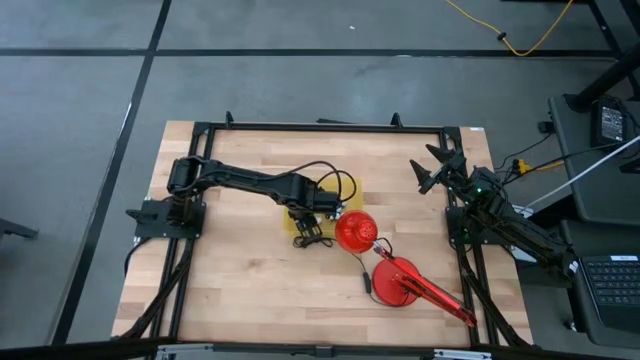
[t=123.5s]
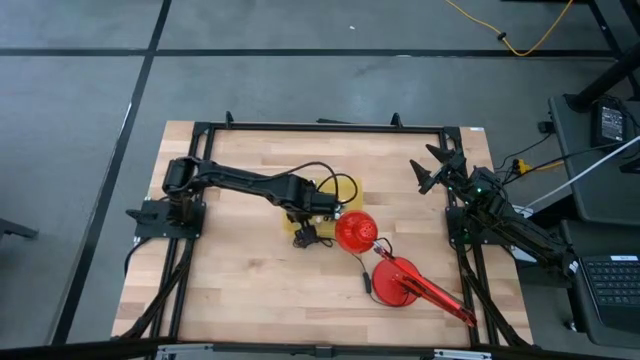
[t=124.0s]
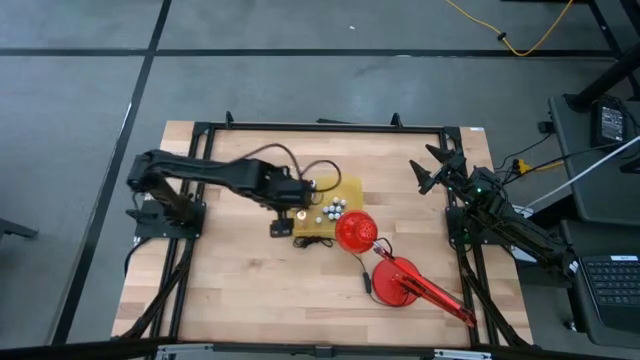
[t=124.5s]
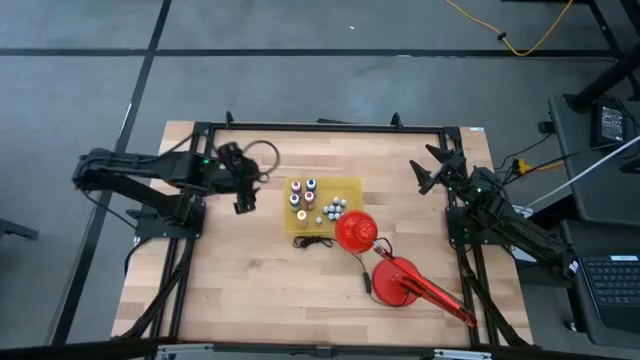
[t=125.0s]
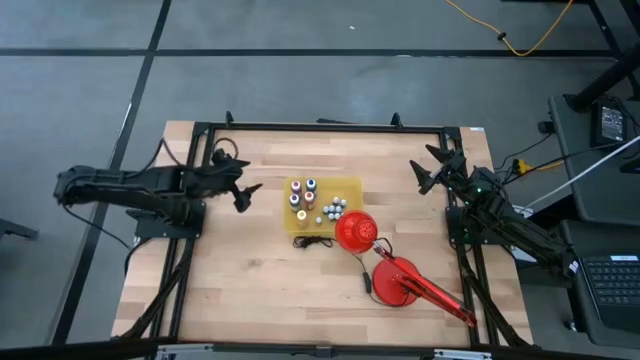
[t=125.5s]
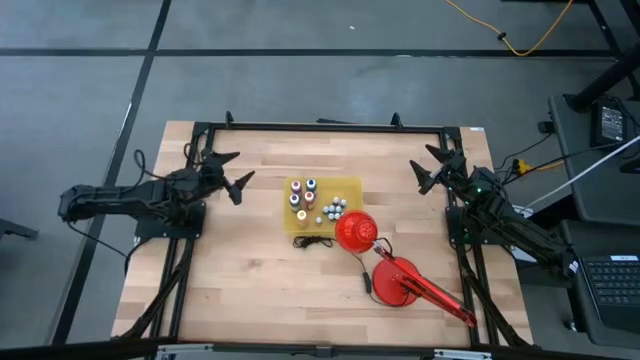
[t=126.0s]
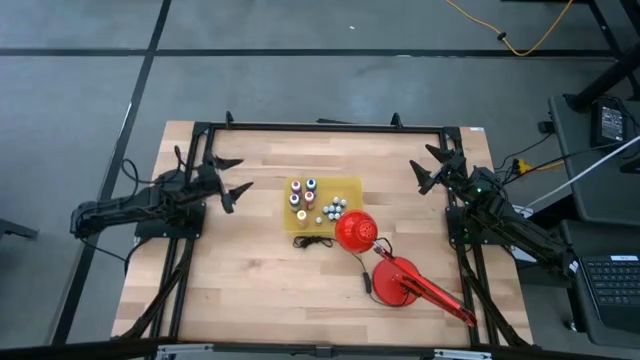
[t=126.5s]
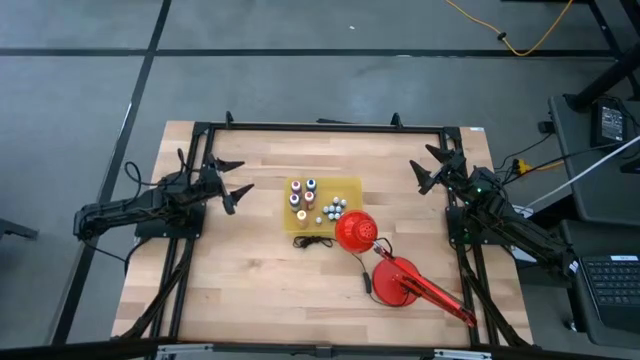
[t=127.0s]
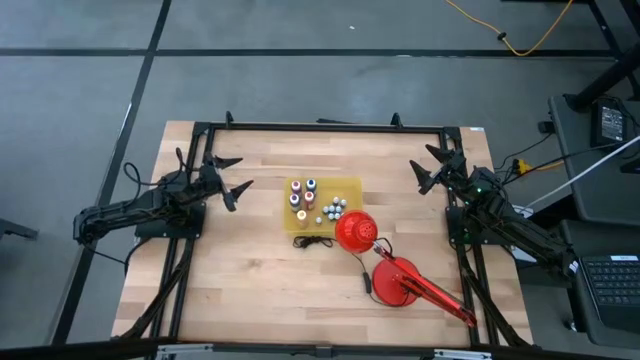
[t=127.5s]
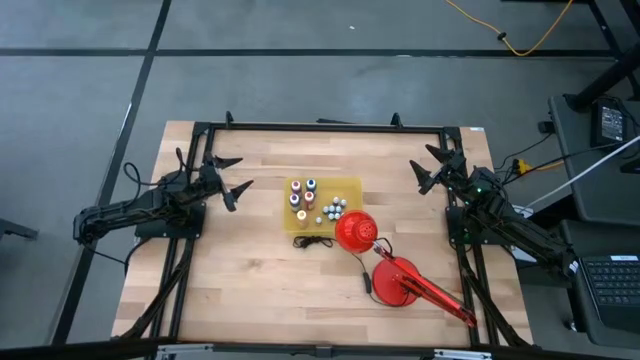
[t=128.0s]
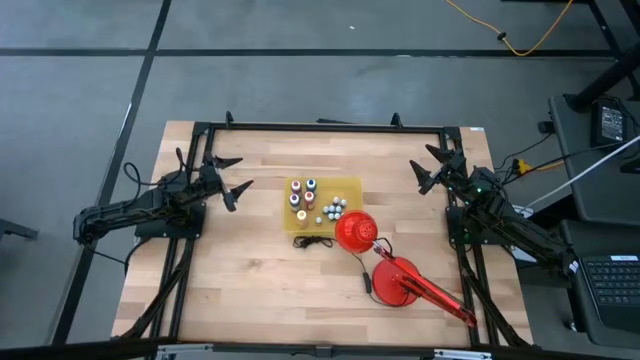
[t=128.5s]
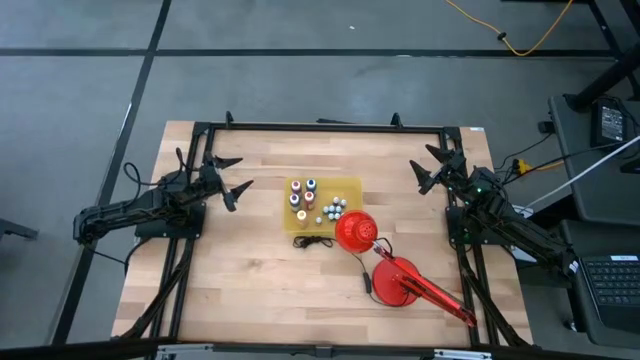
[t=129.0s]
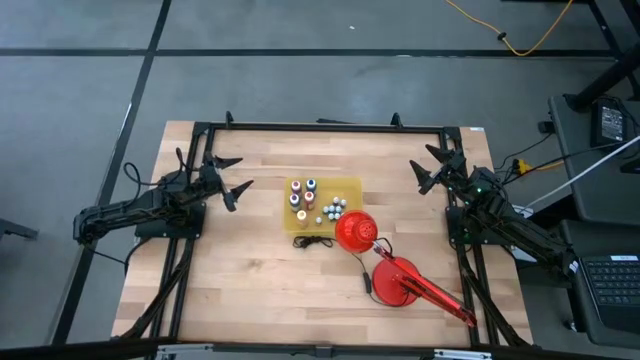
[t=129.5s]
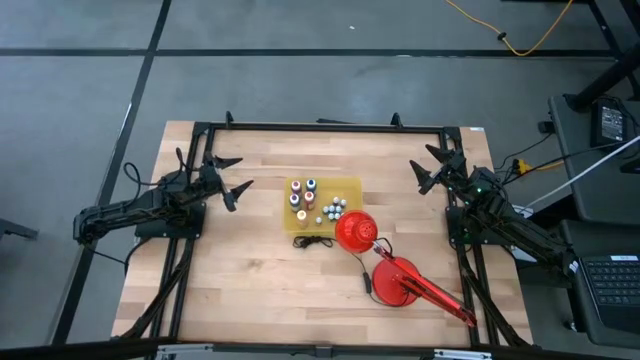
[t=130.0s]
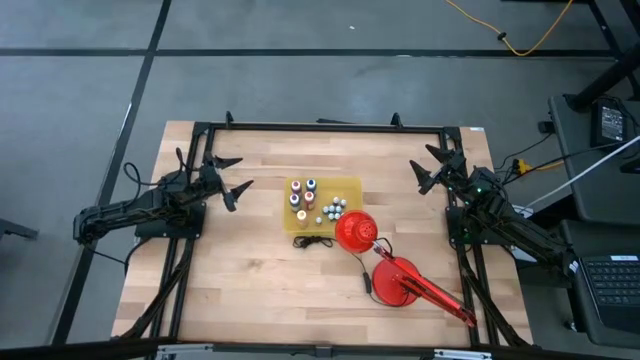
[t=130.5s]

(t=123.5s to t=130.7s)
Task: Pick & Place food coloring
Return to Home Position

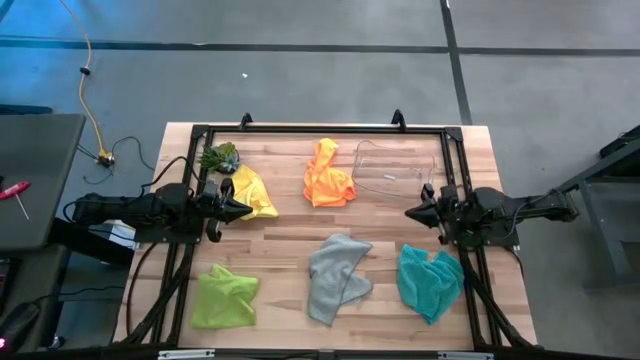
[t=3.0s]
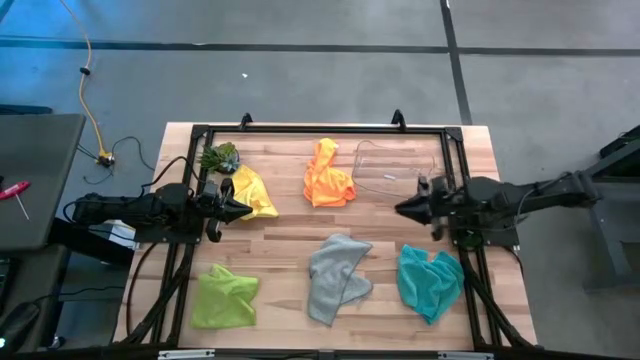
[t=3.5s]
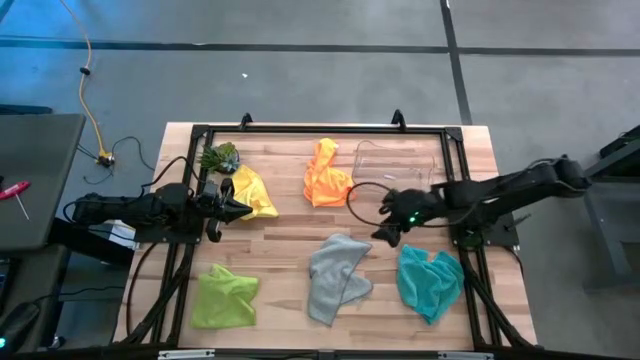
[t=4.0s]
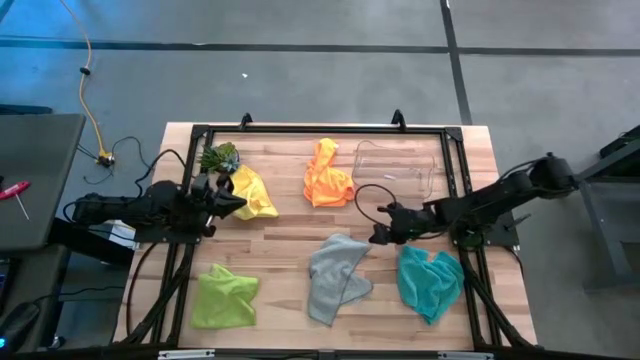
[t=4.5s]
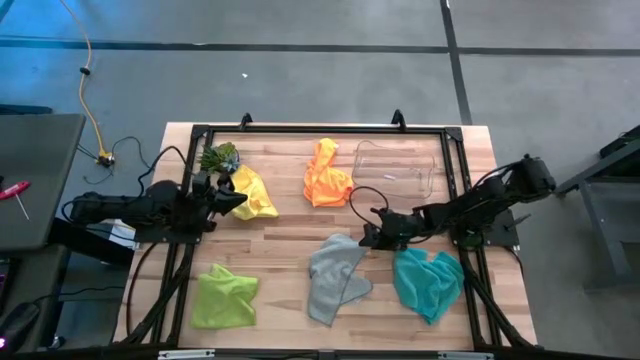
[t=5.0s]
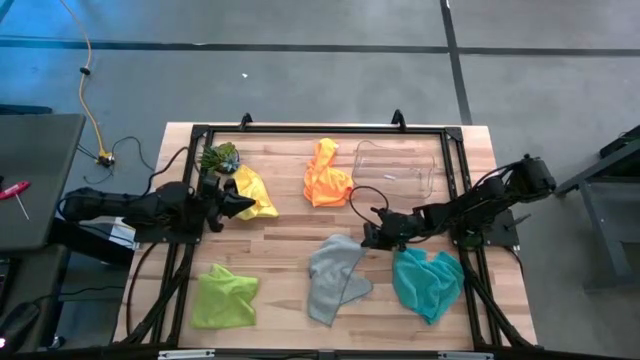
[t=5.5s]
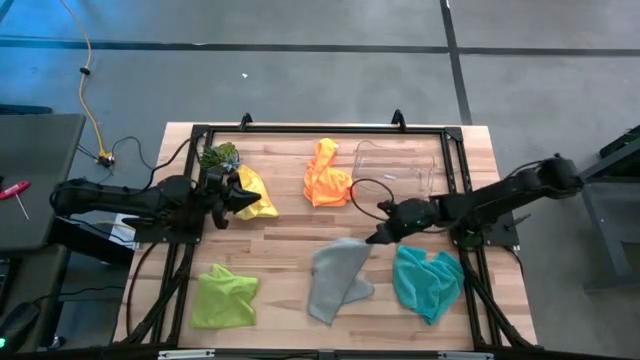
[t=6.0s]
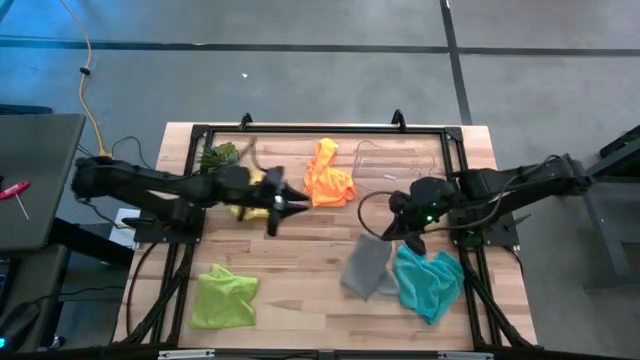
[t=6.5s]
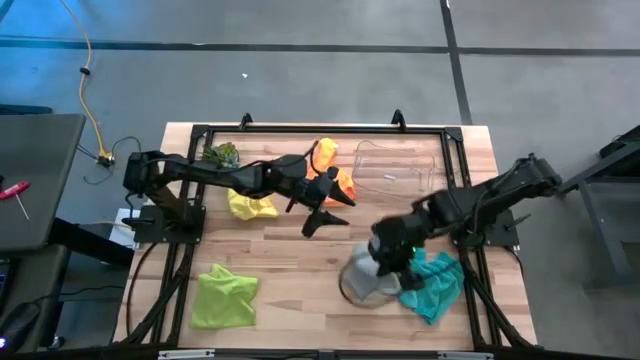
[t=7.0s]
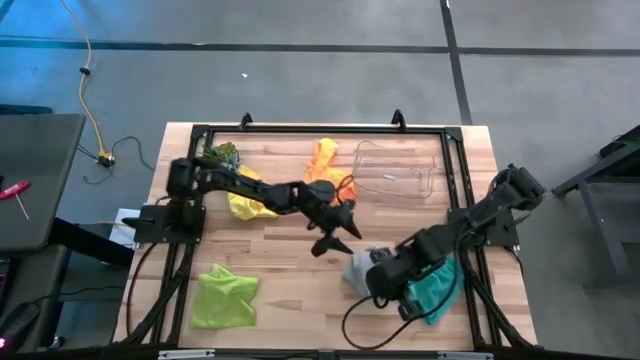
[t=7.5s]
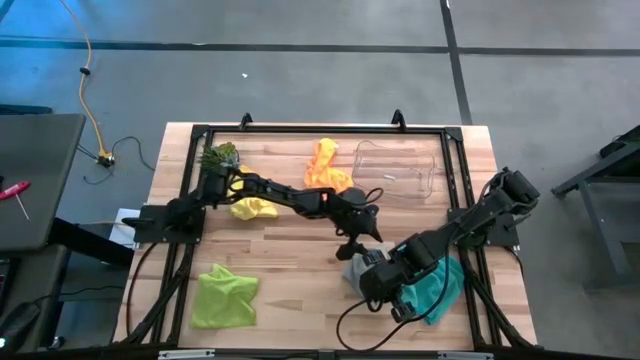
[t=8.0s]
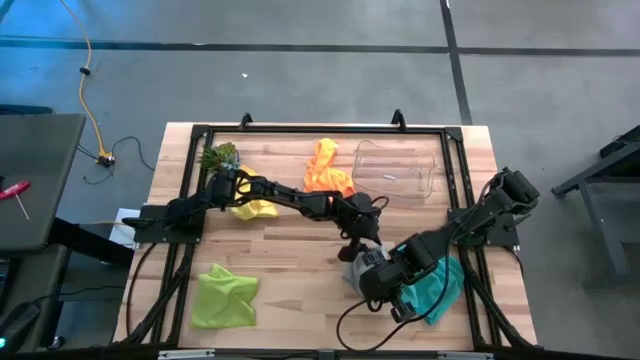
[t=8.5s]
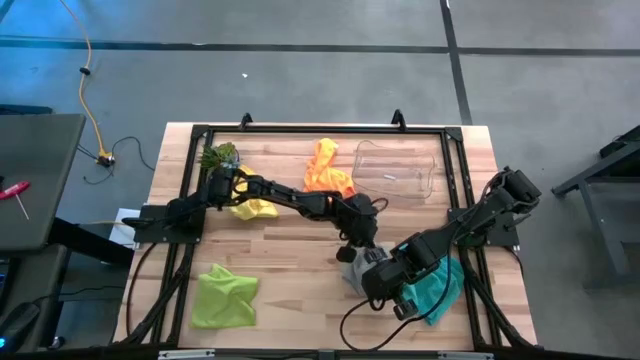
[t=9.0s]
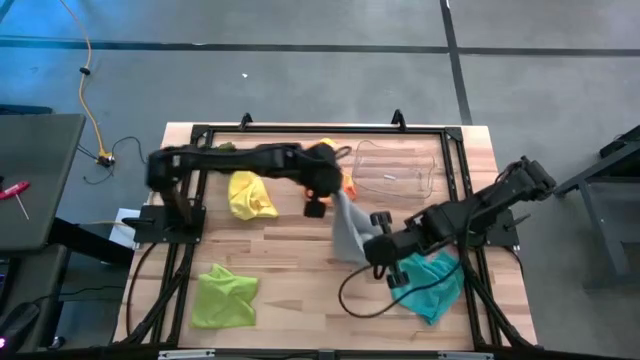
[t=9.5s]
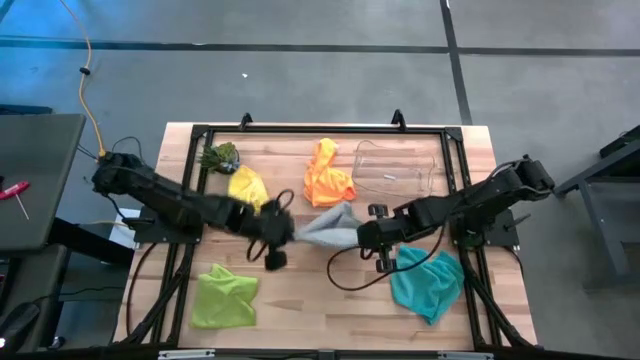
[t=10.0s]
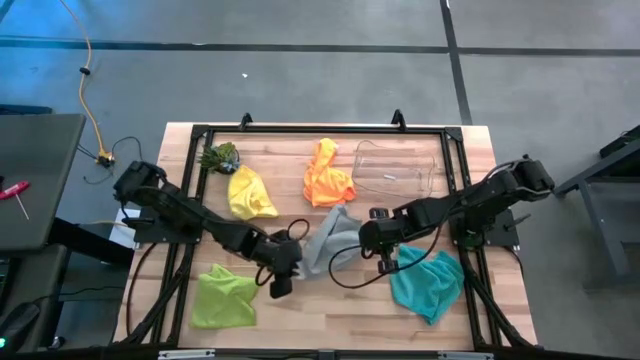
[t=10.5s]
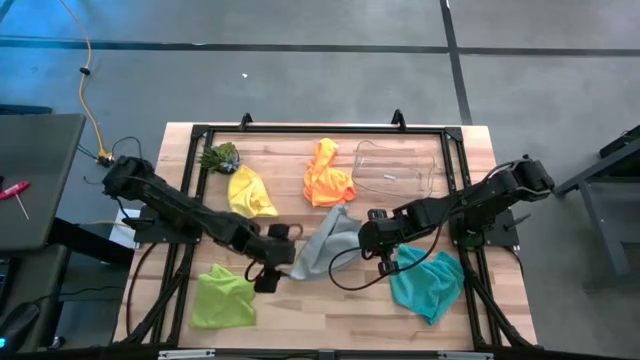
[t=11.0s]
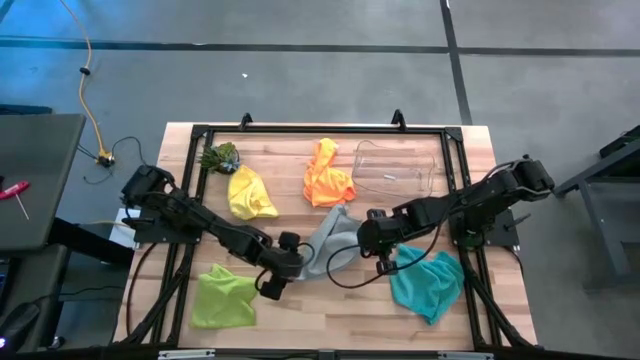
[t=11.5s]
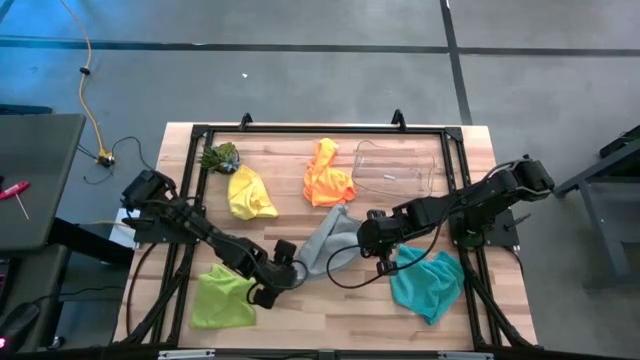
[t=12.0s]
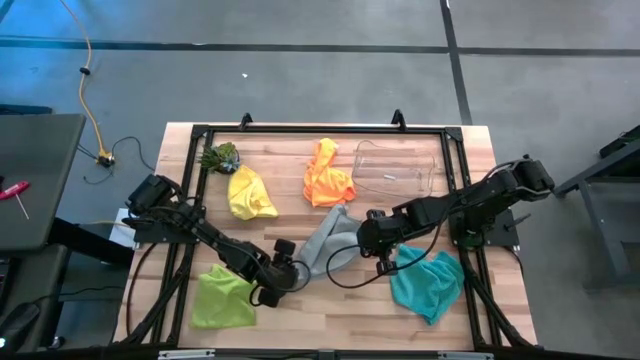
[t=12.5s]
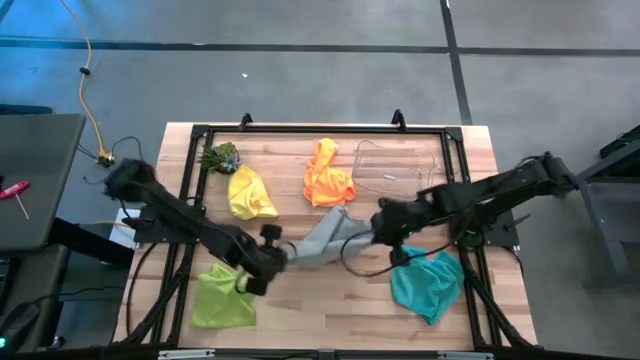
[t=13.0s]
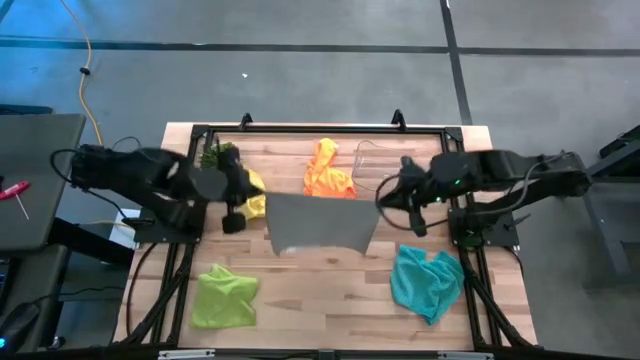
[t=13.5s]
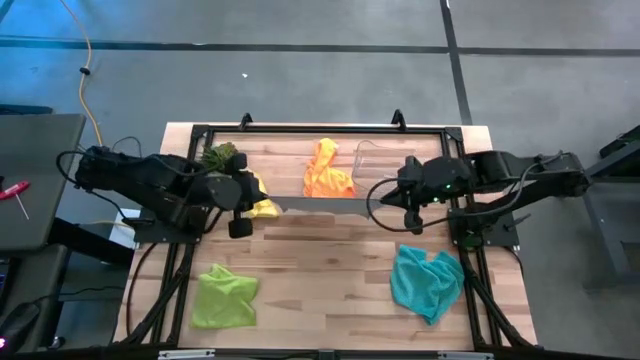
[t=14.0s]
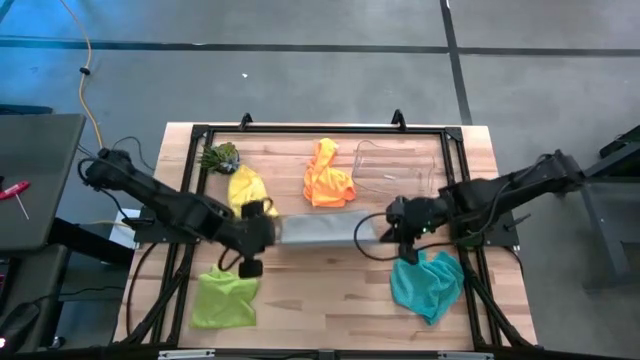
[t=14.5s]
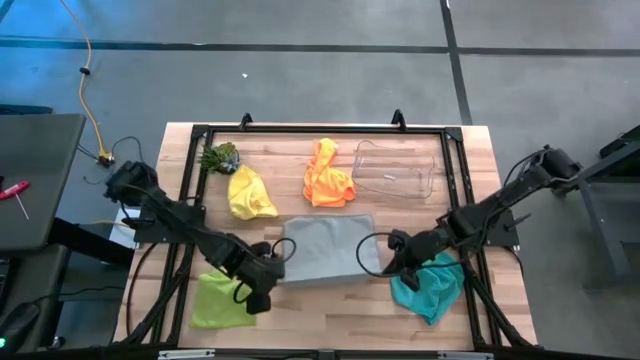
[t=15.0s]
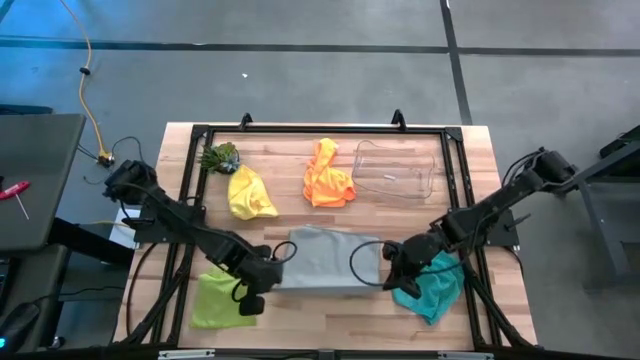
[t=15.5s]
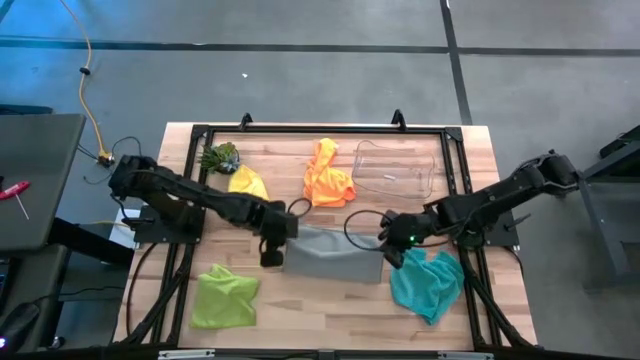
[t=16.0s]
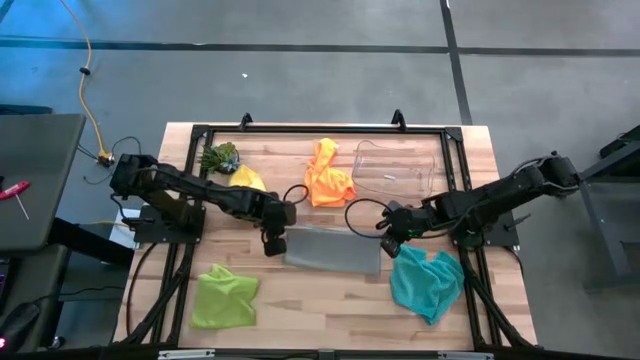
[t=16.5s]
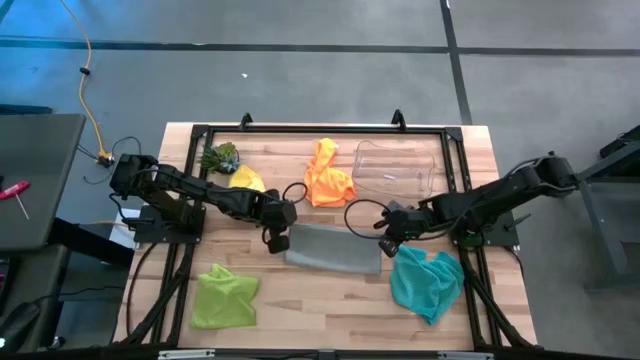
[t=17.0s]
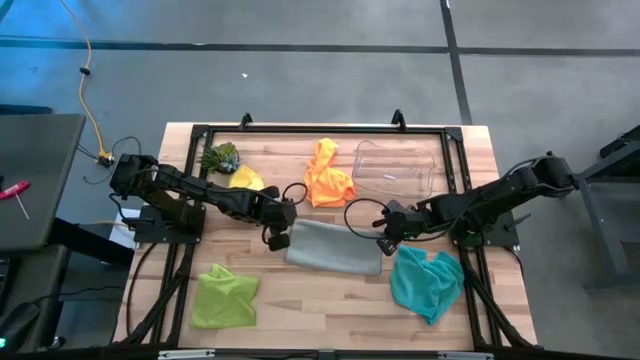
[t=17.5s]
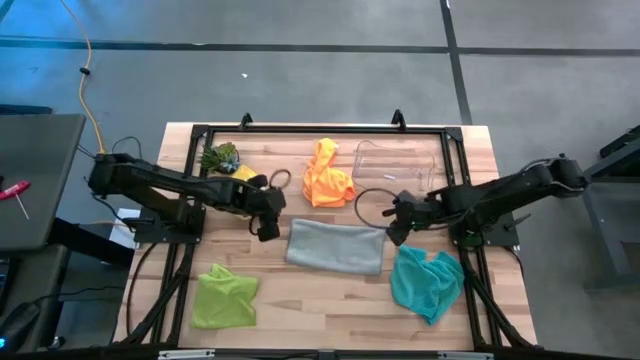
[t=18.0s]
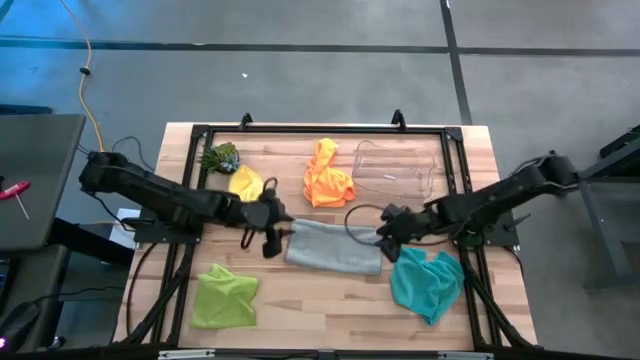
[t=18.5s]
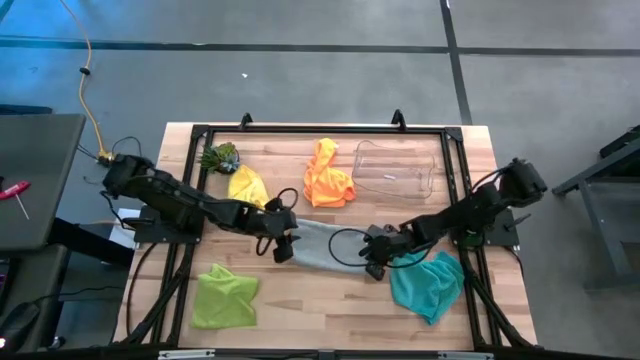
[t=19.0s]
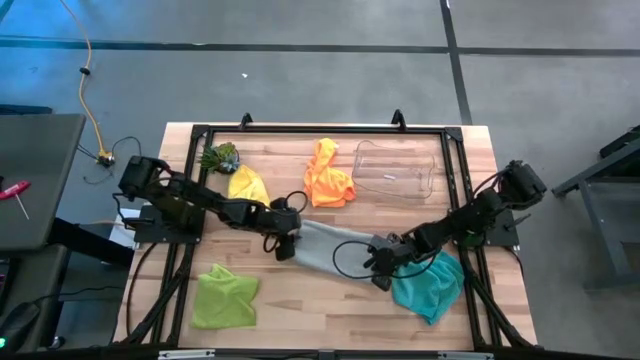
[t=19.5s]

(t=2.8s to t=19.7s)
Task: Fold microfiber towels
Fold the gray microfiber towel
